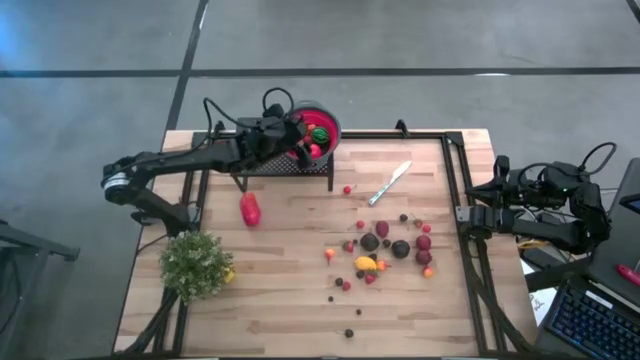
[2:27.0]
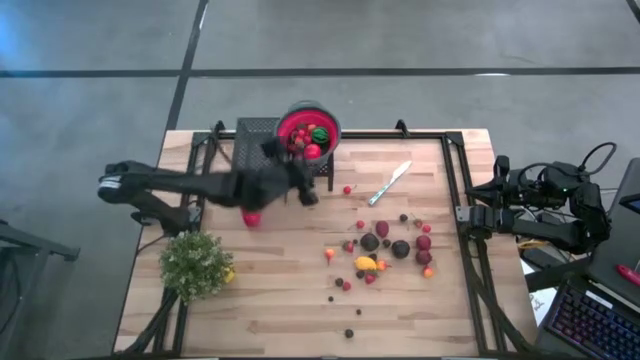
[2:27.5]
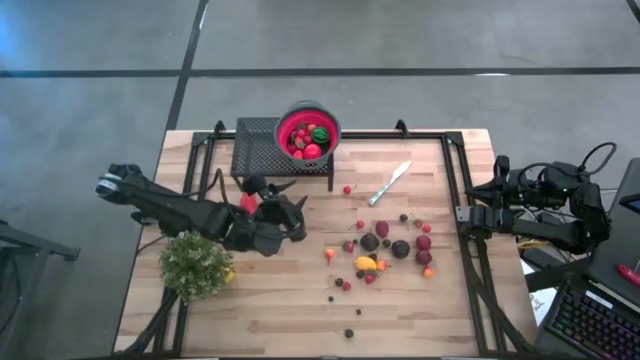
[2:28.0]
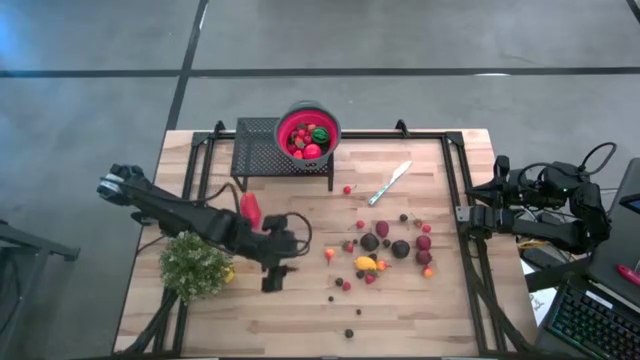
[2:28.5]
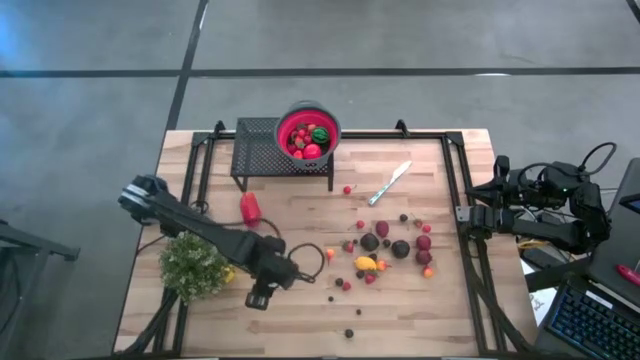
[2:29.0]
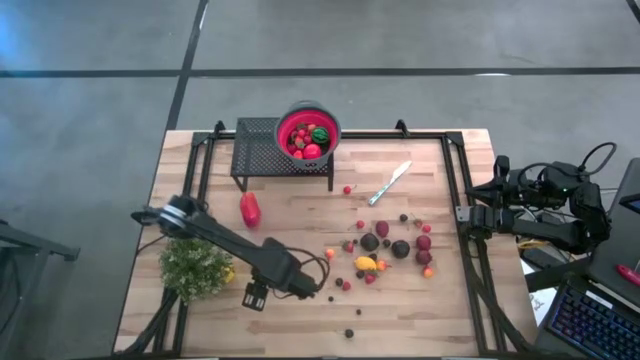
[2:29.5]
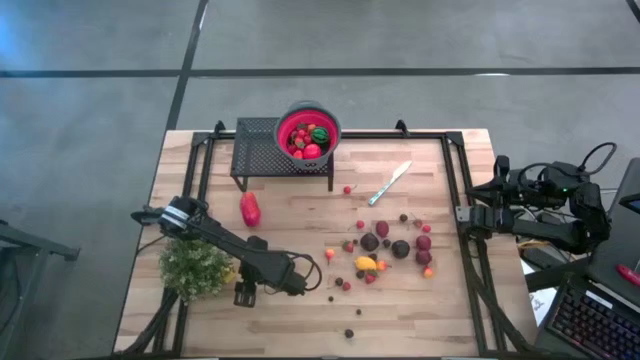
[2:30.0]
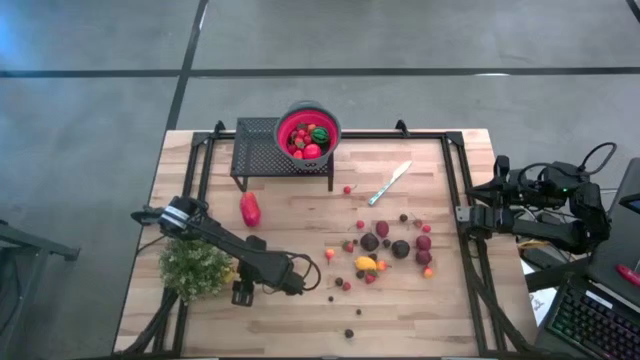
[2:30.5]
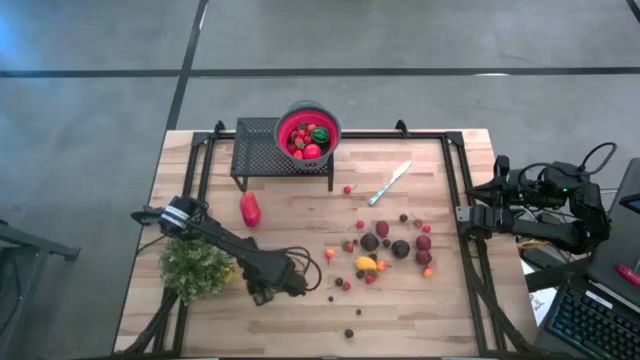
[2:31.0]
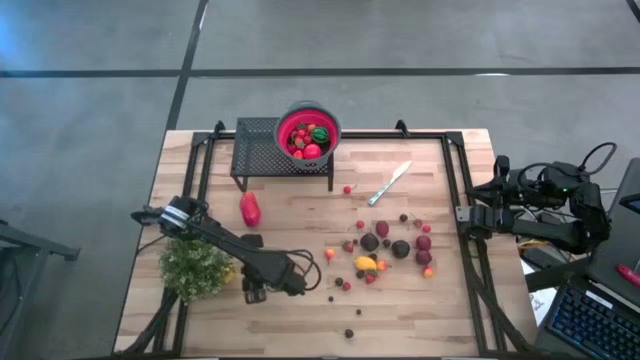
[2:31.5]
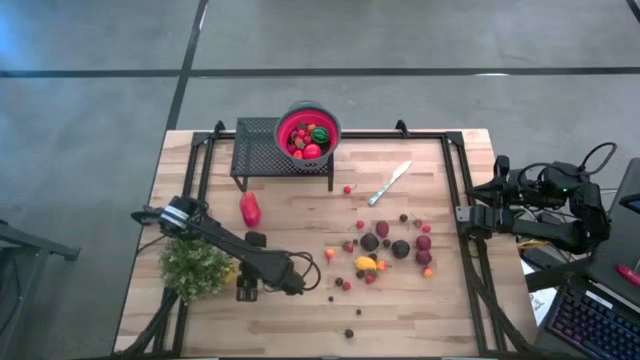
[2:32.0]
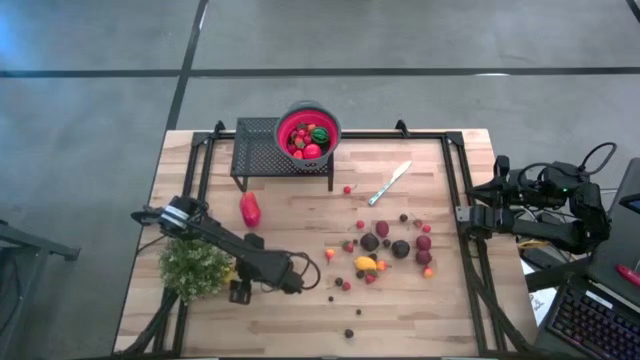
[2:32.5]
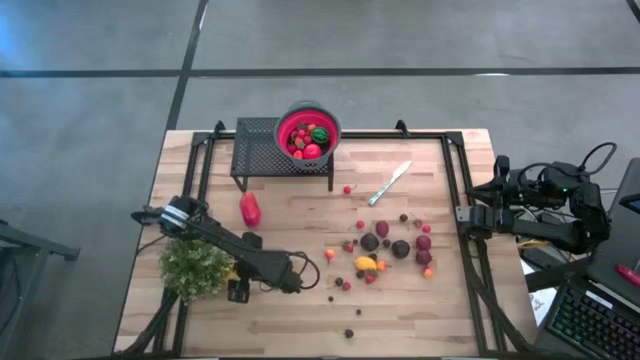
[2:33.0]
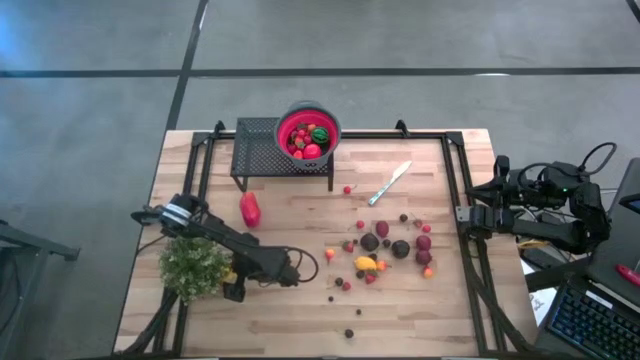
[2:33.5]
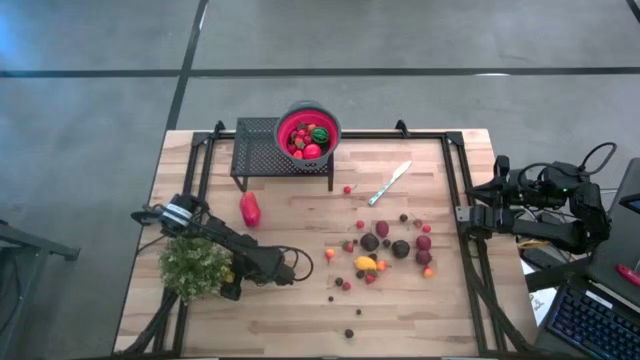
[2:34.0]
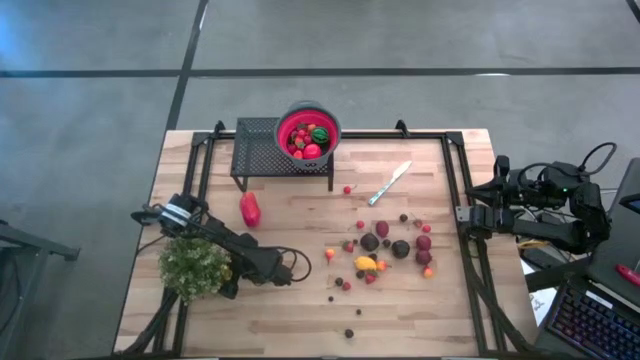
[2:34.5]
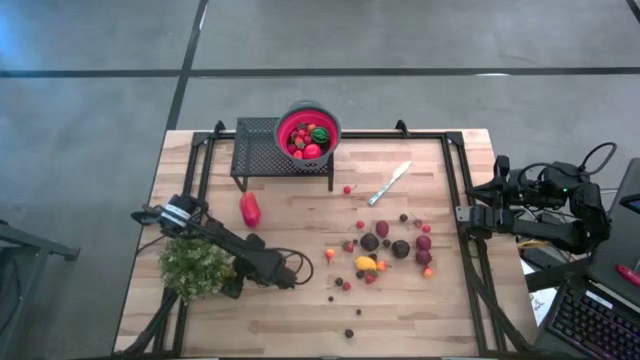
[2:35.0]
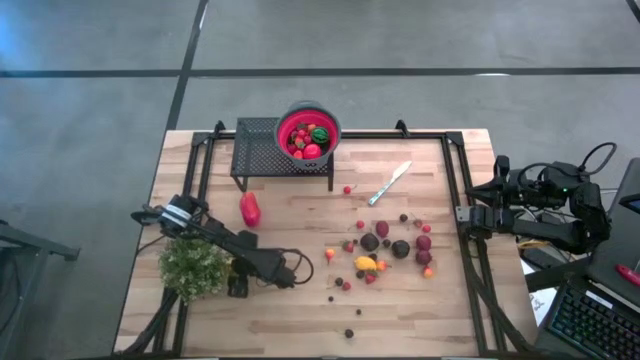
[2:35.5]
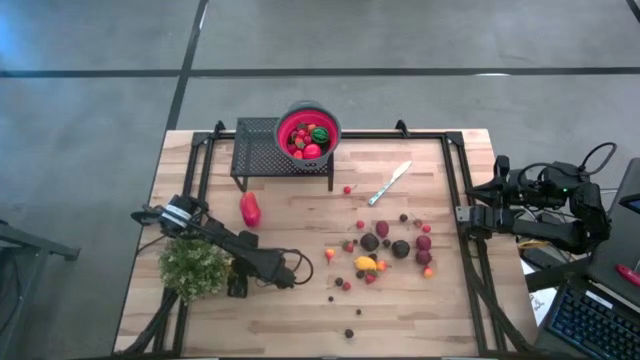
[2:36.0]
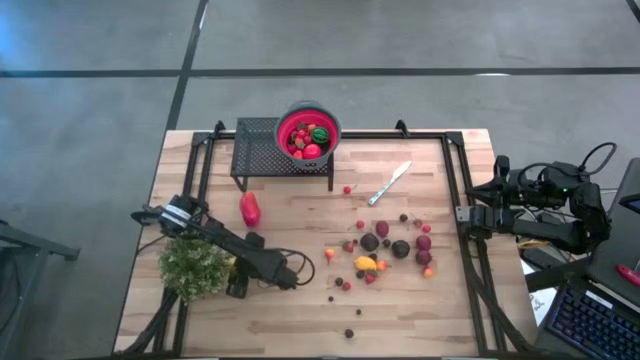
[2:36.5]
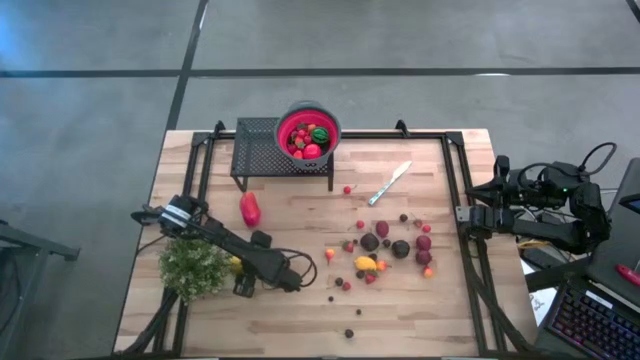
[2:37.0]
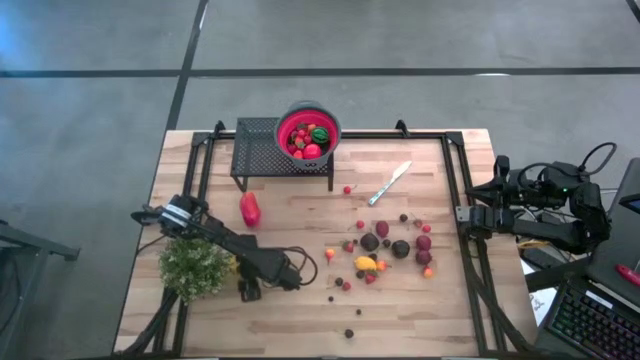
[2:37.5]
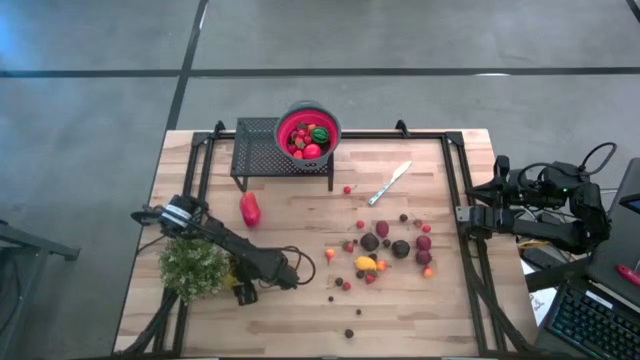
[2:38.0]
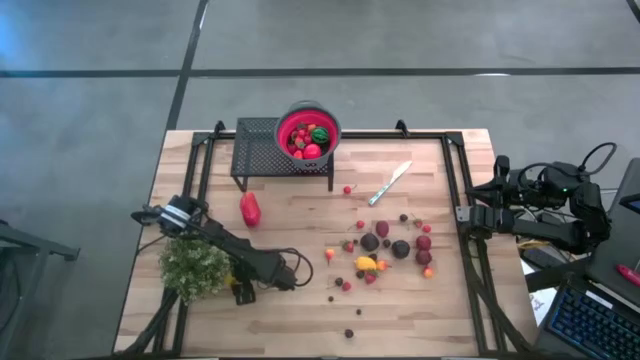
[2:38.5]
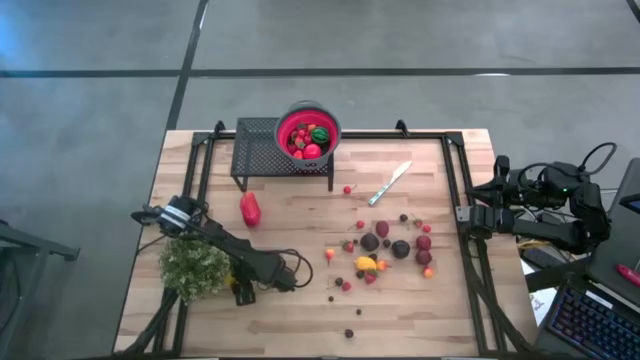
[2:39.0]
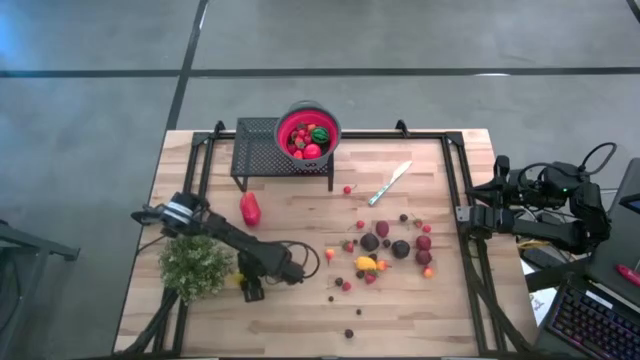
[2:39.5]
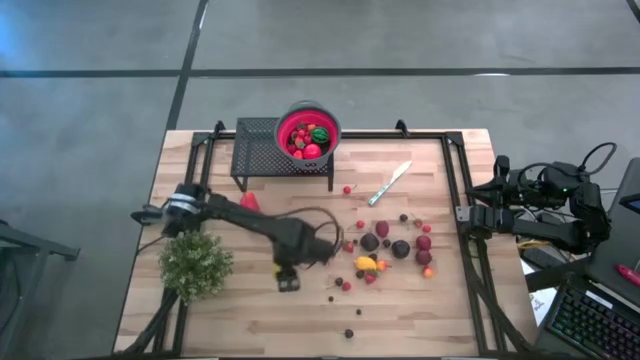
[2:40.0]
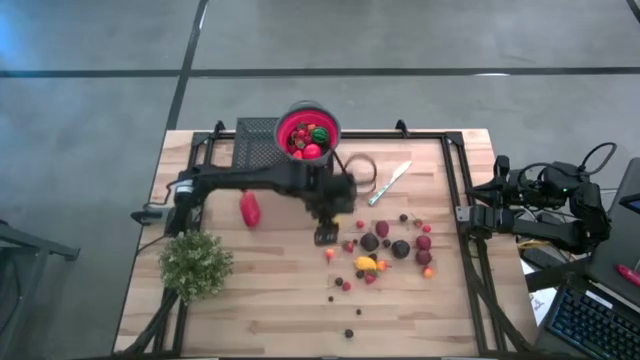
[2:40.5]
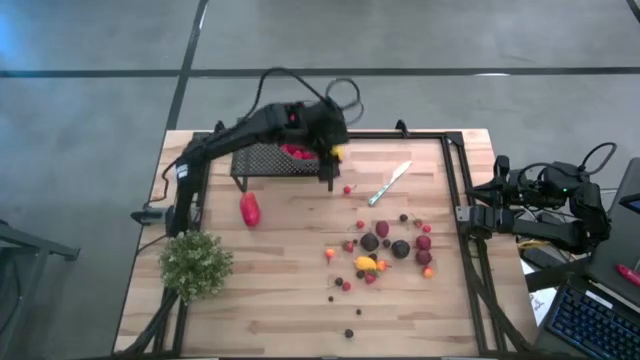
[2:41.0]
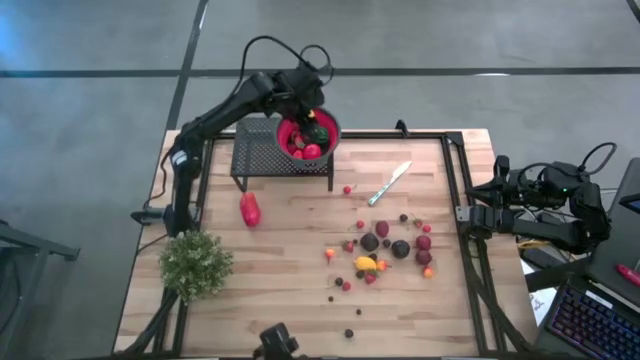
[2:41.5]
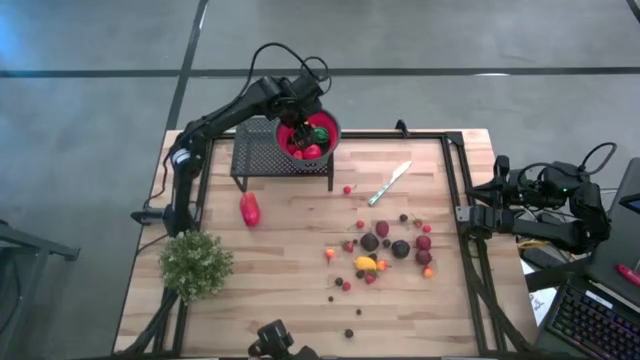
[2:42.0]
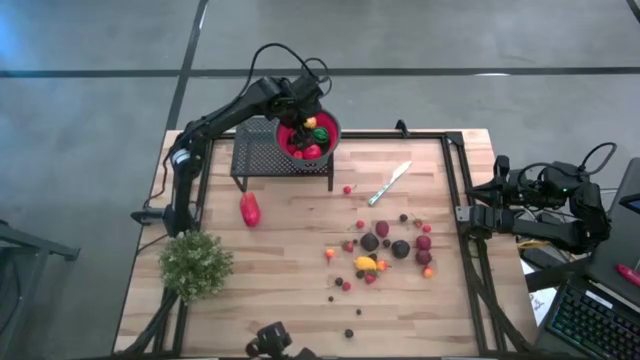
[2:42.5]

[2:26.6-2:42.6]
Task: Pick & Place Fruit
Put the yellow lemon into the red gray strainer bowl on the shelf

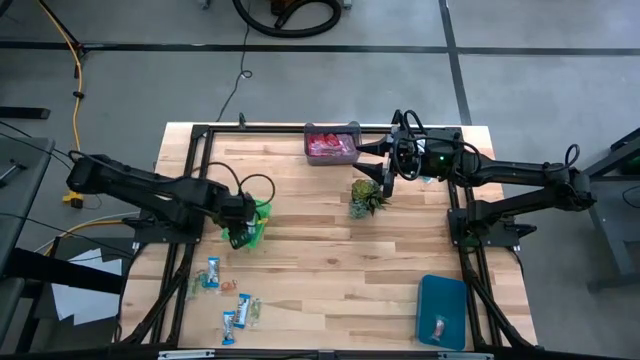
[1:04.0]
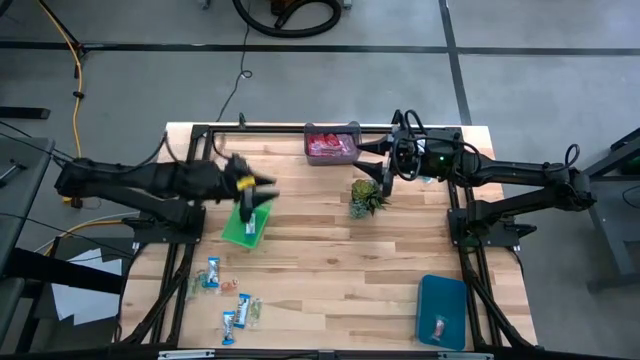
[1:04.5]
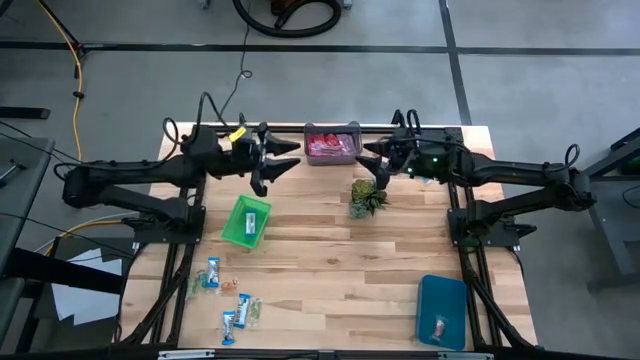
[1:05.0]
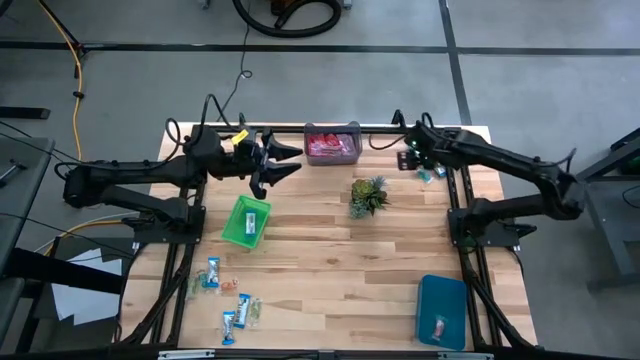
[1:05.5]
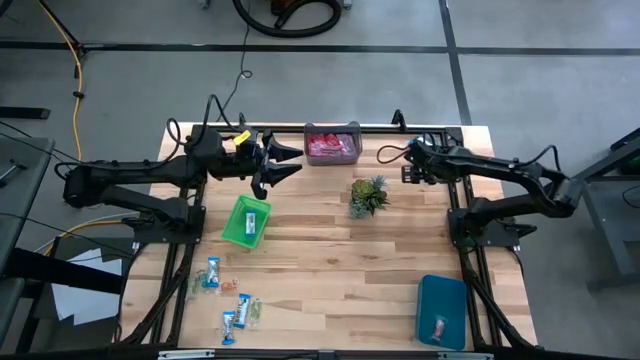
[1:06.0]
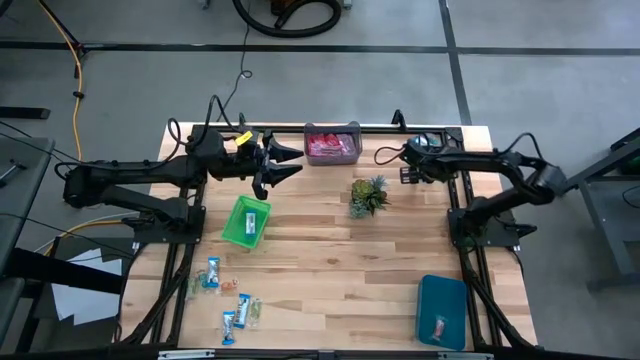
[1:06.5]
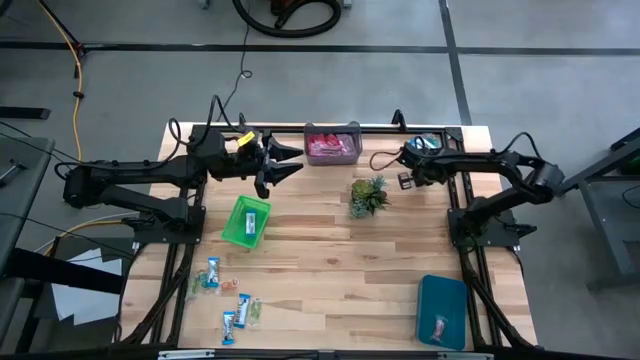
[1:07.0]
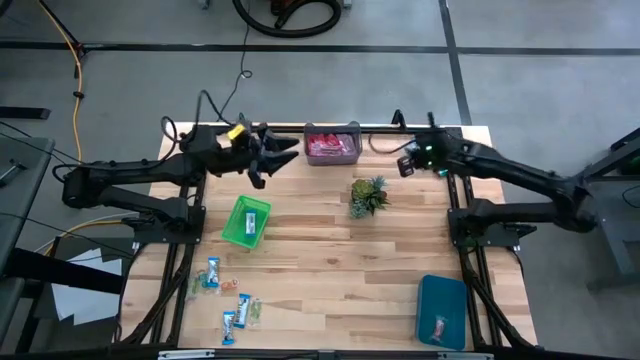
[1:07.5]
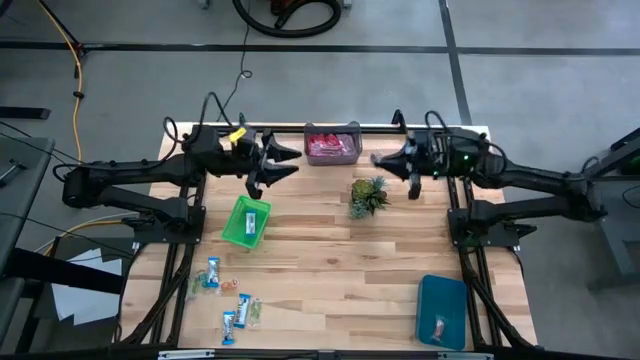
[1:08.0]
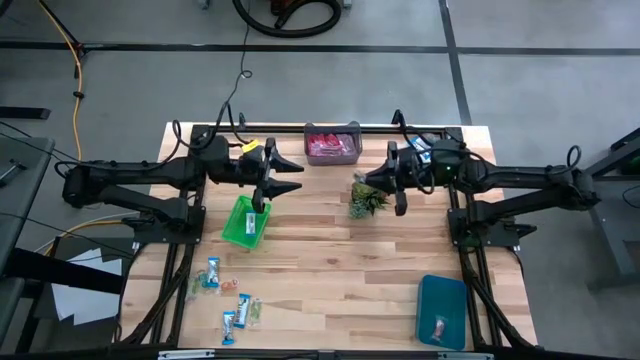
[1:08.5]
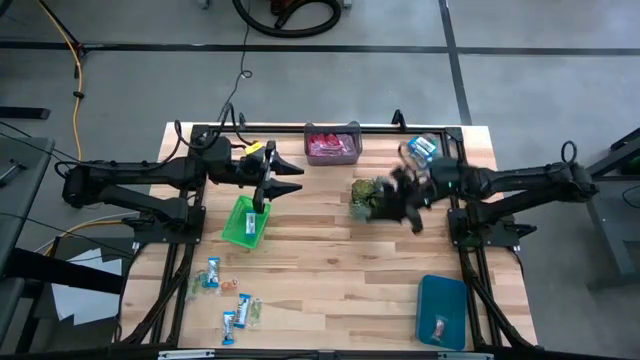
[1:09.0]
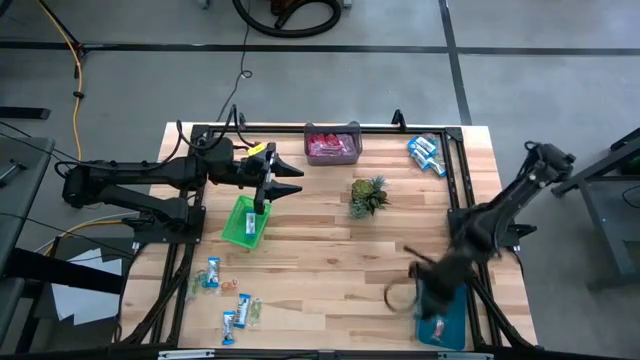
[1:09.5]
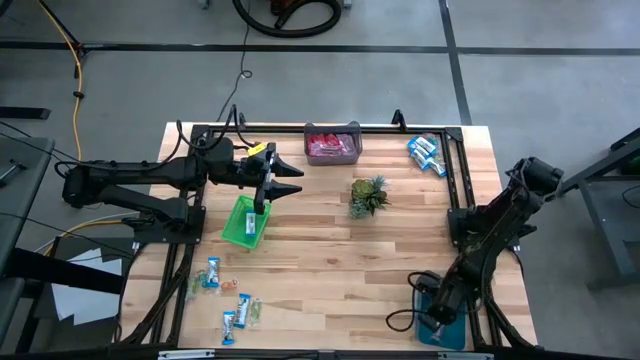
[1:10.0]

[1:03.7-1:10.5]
Task: Sort candy
Put the transparent candy into the blue bin
